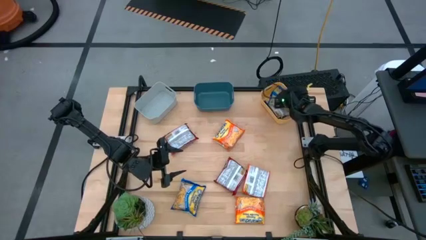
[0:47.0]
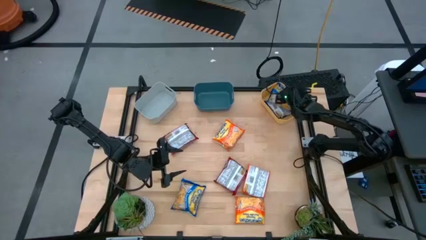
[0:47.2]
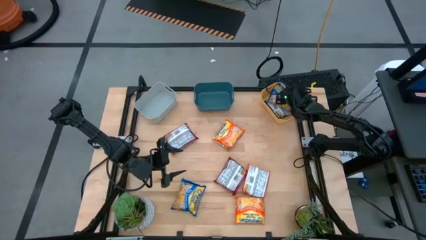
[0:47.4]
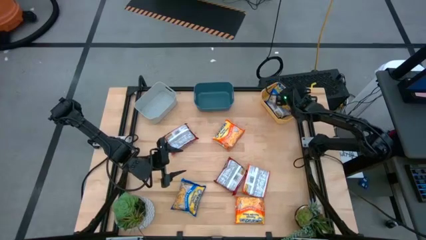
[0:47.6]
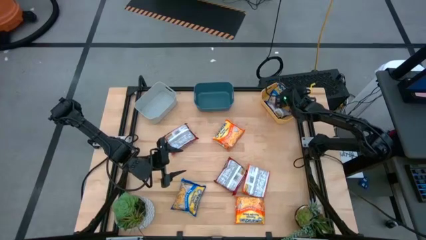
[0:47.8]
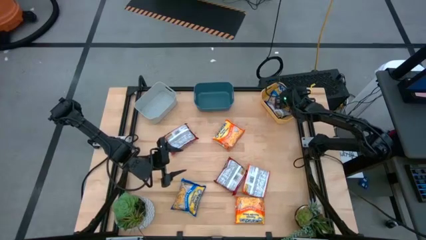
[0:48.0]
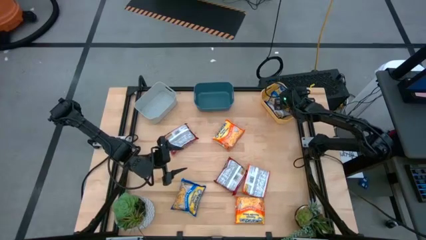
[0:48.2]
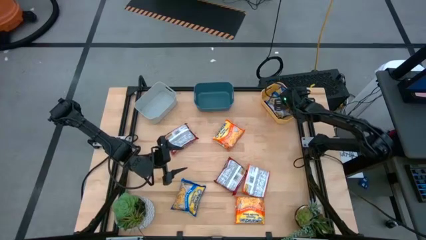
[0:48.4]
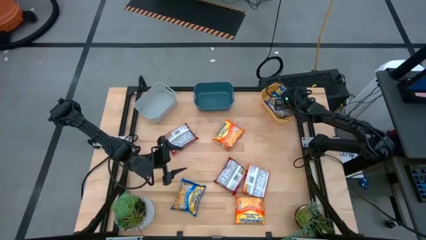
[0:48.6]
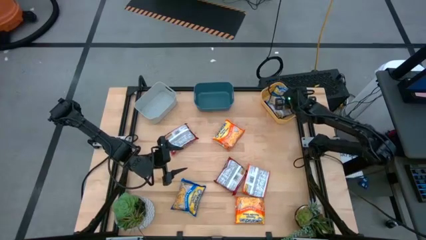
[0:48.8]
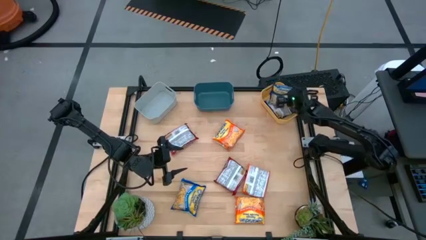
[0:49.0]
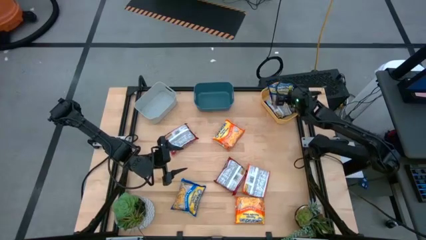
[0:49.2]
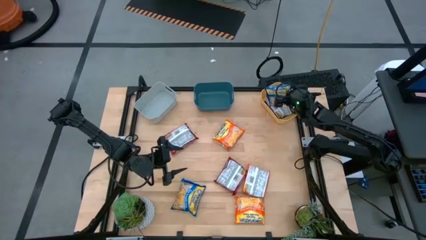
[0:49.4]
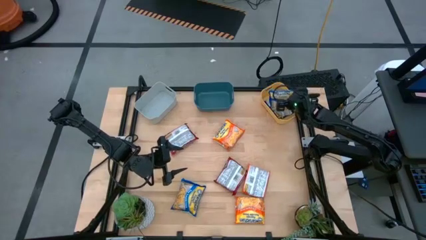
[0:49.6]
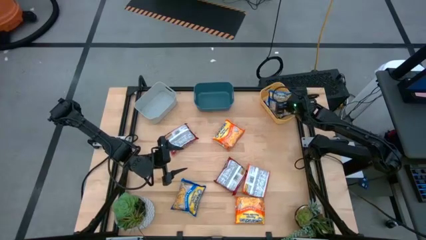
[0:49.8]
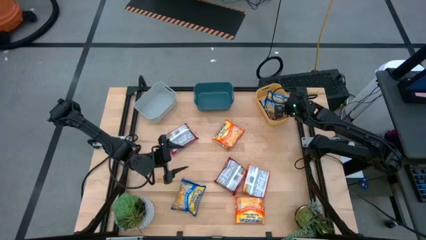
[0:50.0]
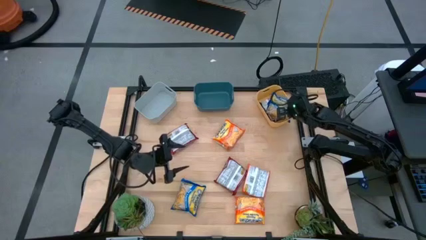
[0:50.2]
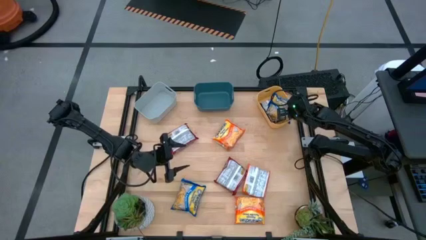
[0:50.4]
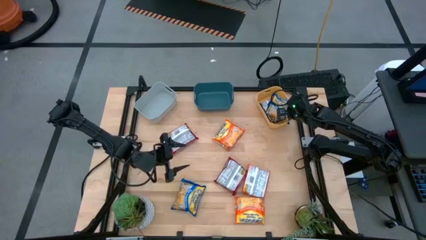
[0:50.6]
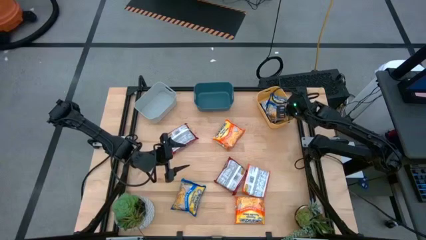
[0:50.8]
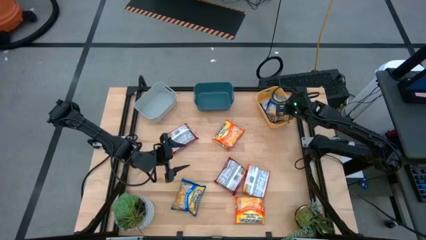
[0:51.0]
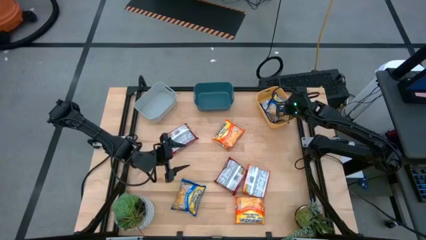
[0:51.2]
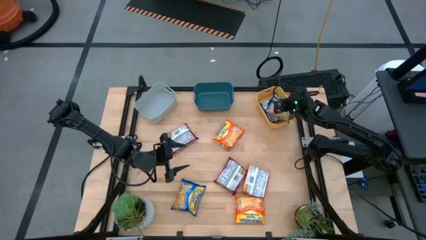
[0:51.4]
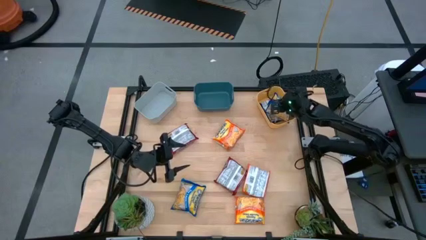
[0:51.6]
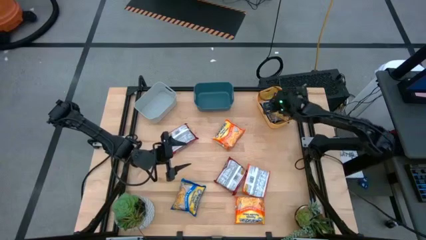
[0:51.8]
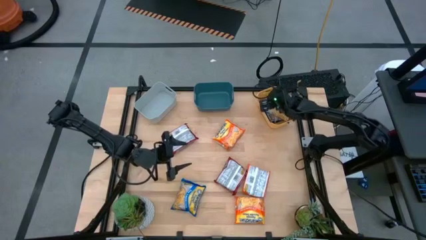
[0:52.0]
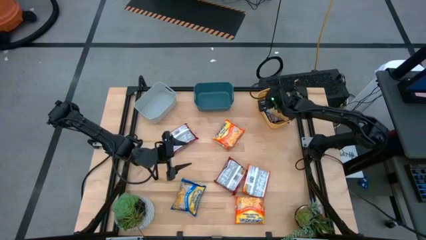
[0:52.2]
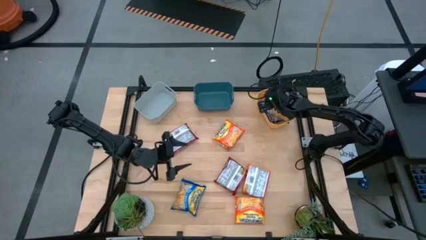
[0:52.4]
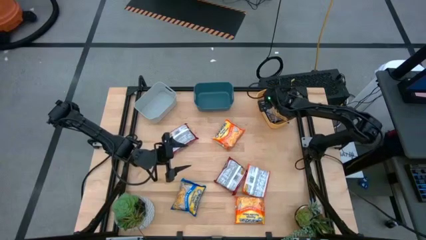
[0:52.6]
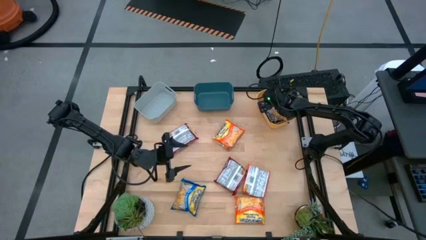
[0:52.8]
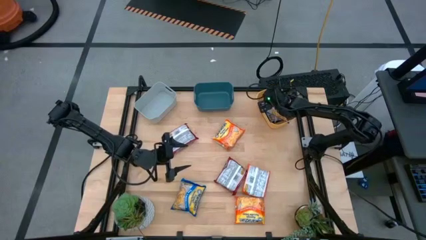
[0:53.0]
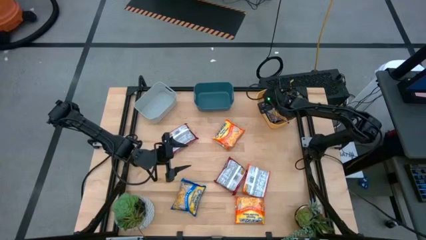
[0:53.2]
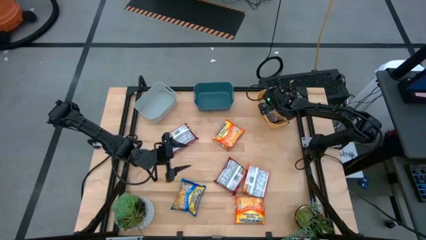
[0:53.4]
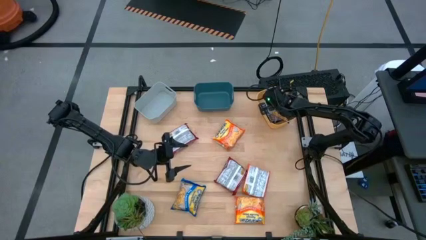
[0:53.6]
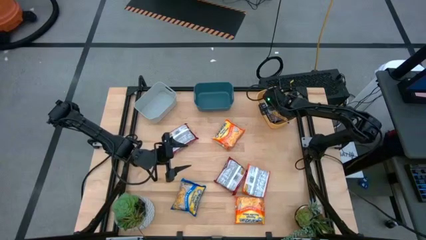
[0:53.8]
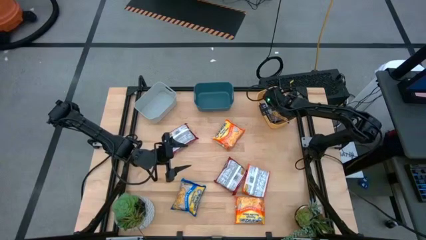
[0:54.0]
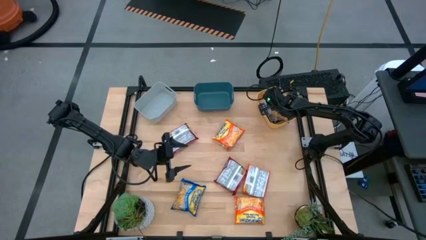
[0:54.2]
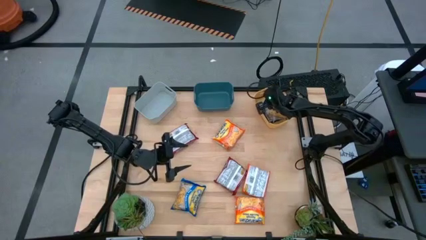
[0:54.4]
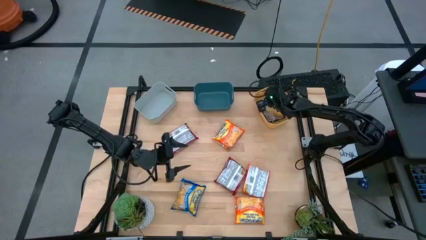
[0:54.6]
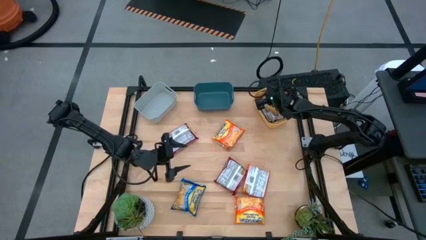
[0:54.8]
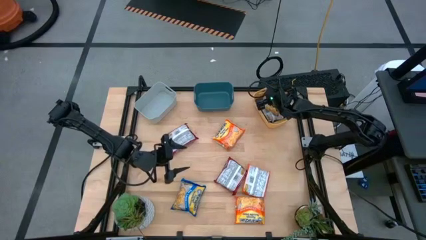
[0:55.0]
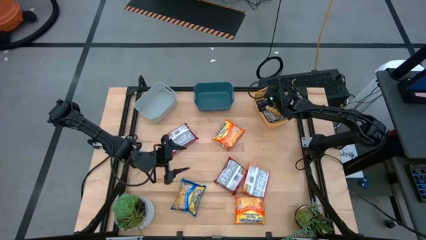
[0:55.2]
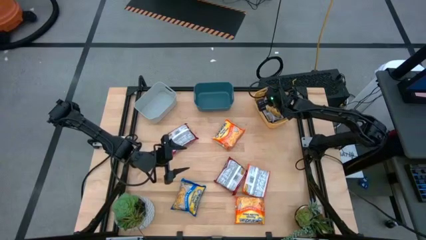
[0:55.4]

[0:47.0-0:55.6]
Task: Sort Maruchan noodles
Put the top blue noodle pack into the yellow bin

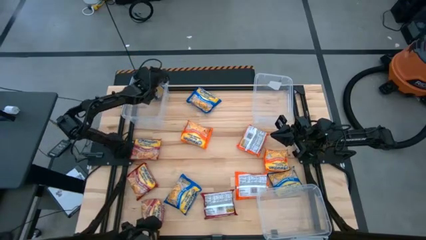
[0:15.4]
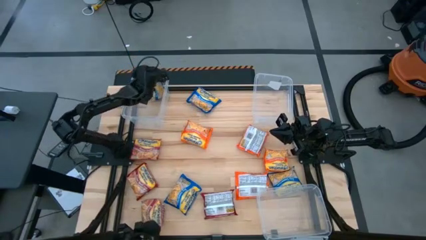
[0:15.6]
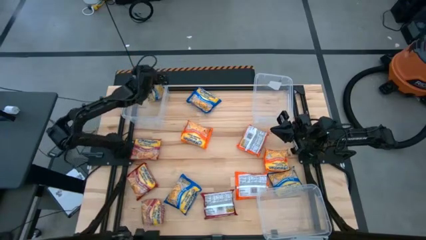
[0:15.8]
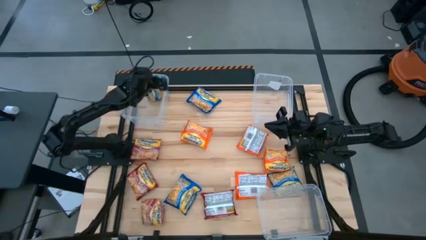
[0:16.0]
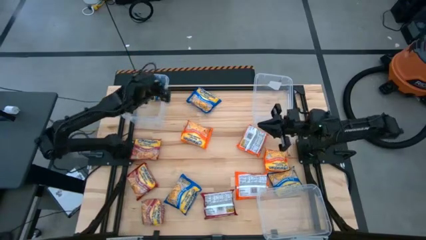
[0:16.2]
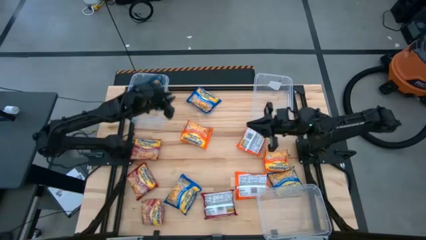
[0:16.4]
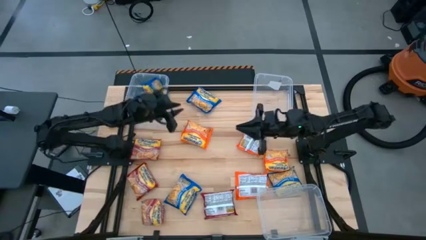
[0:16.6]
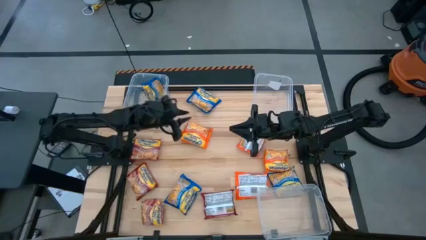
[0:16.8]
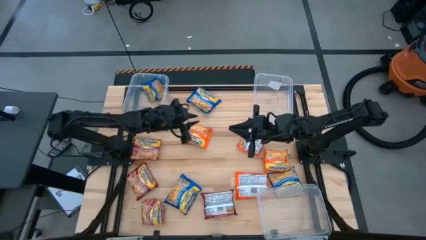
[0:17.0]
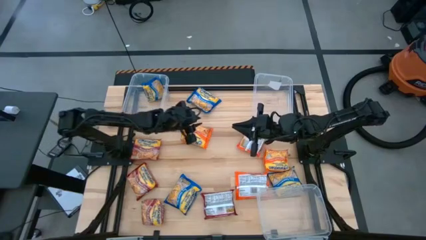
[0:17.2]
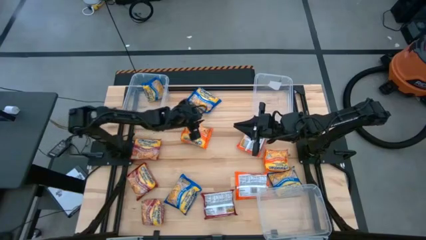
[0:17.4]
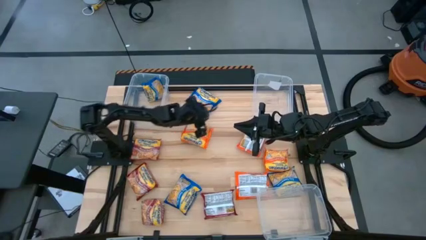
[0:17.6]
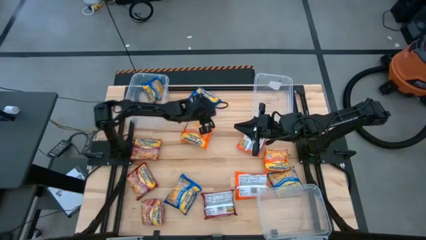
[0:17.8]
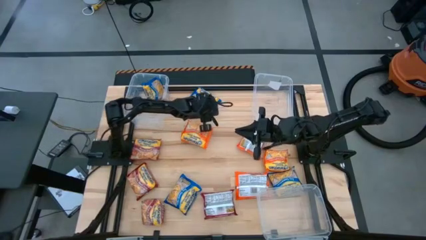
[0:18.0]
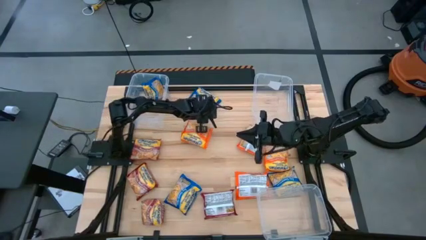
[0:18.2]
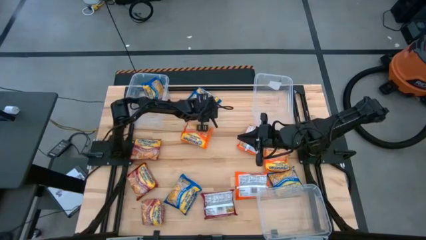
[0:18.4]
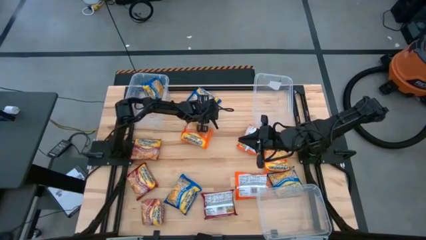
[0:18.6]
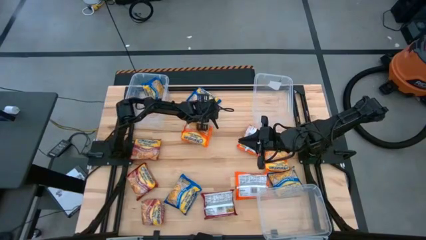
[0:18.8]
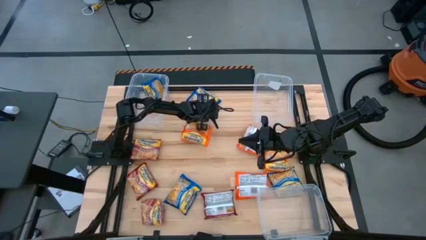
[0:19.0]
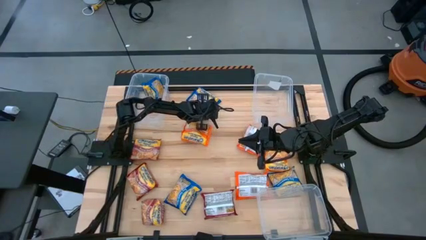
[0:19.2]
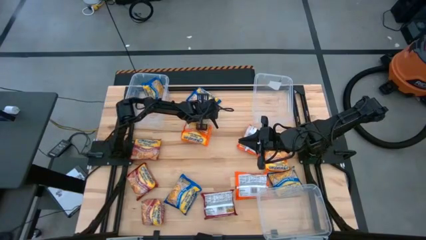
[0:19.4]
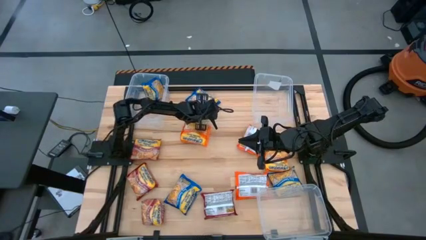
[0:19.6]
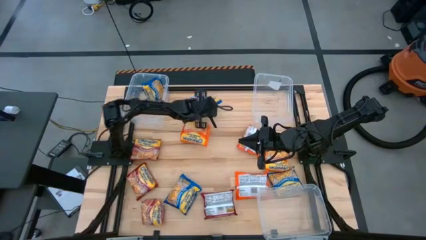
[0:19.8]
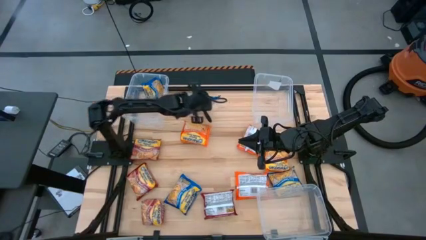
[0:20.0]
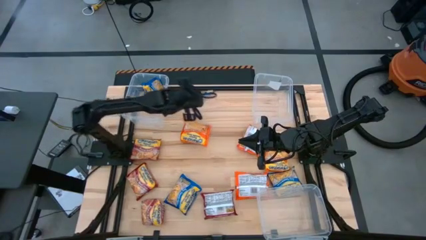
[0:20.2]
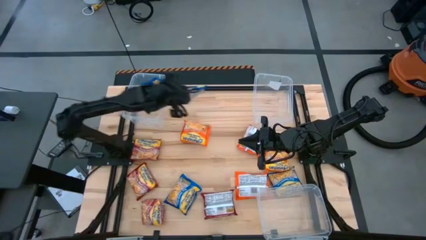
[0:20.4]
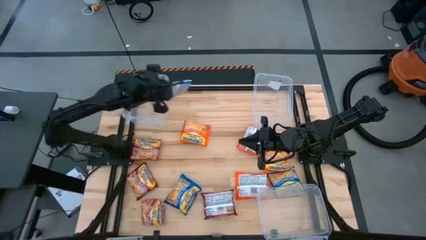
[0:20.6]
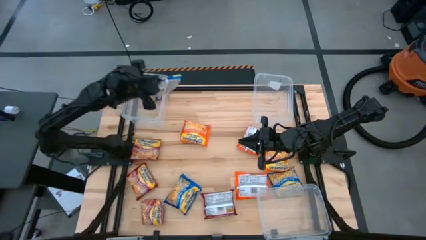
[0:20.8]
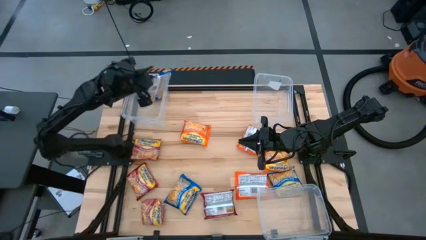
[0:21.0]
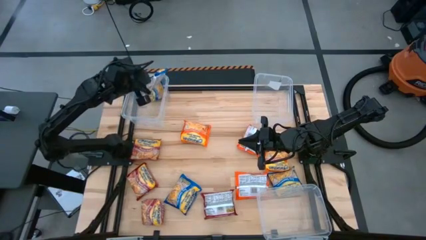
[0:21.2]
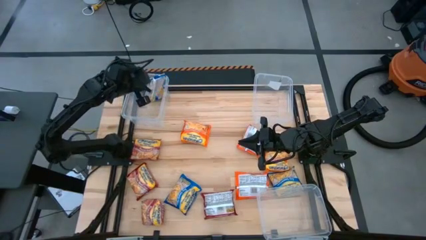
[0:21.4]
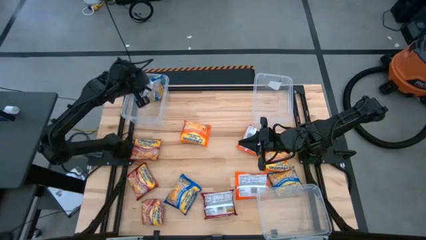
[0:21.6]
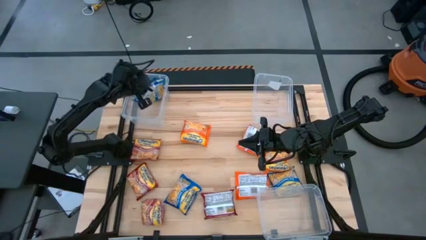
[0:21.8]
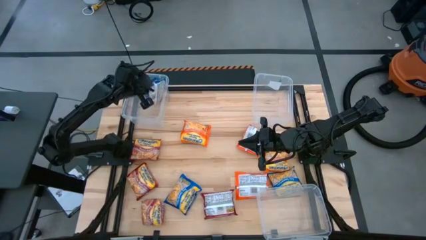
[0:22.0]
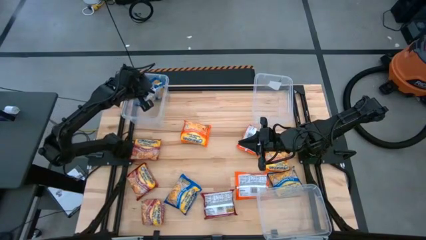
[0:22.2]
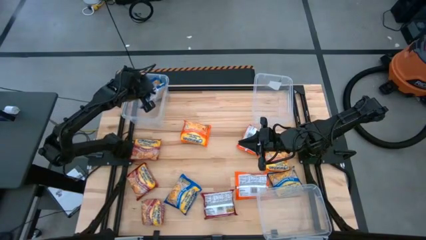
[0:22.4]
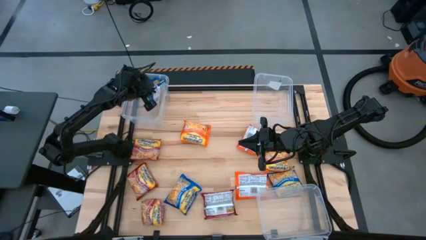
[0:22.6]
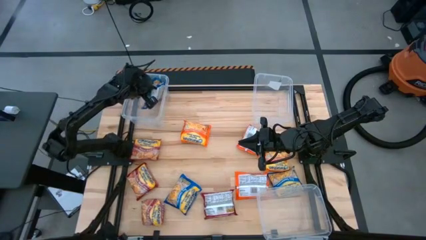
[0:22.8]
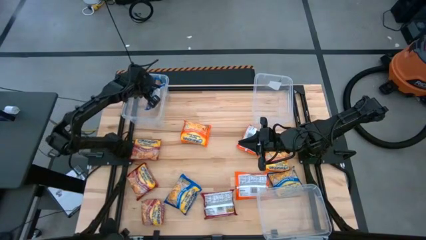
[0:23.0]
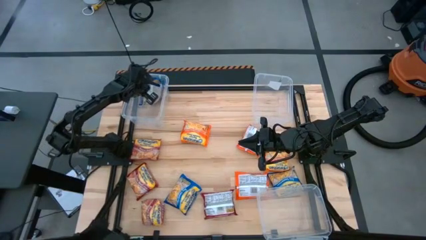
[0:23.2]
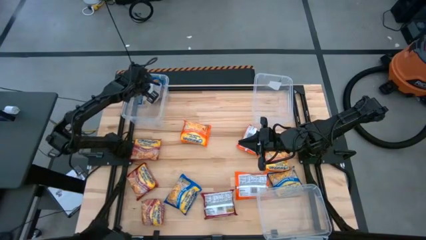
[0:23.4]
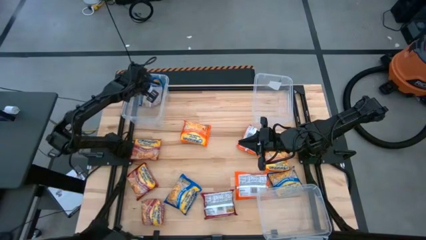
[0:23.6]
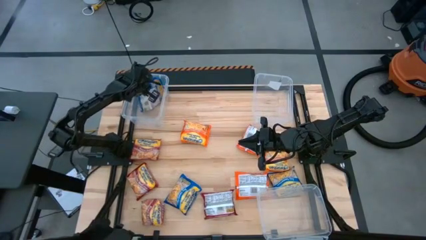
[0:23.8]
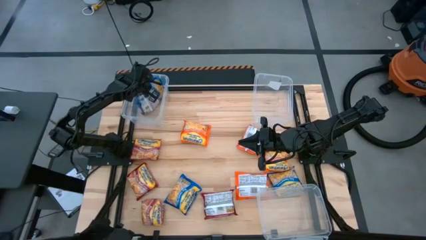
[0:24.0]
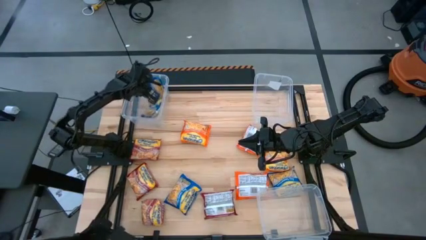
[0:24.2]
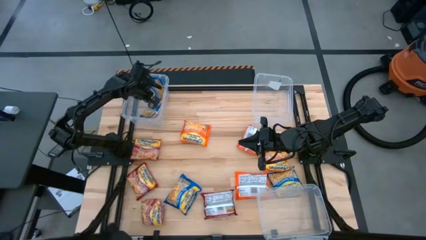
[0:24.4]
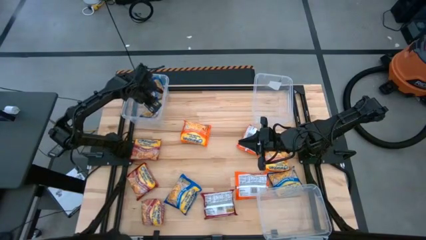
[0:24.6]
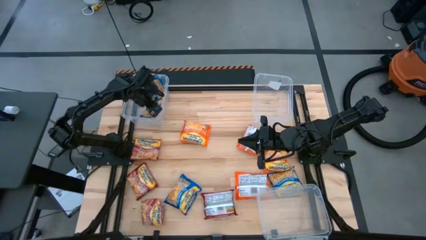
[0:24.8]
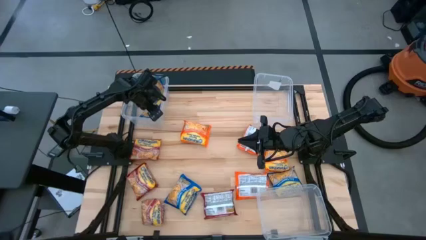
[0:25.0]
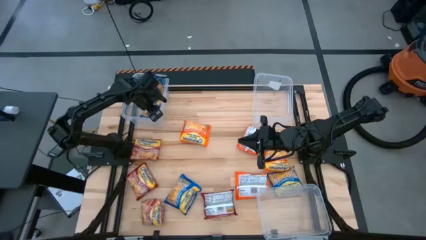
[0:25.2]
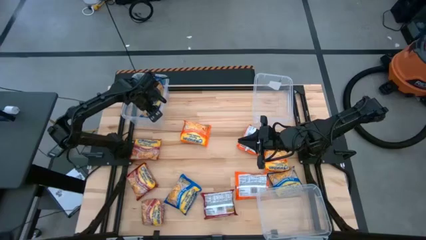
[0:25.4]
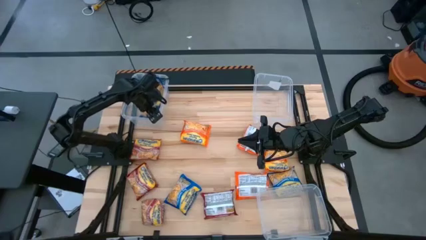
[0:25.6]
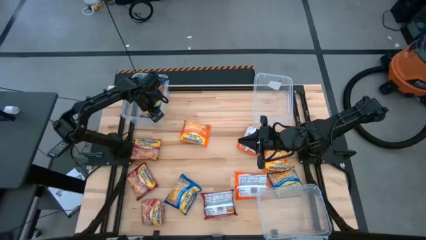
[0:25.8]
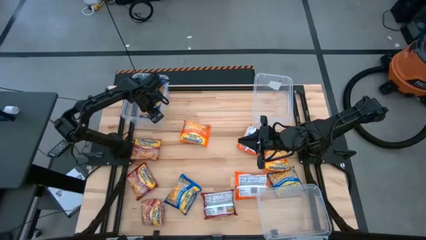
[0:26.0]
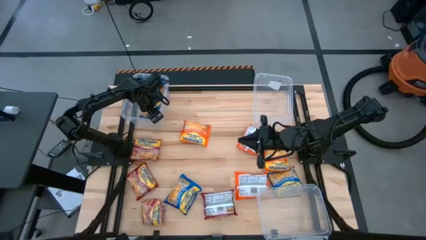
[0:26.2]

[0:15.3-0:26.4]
Task: Sort Maruchan noodles
Put the blue noodle pack into the top left transparent bin
